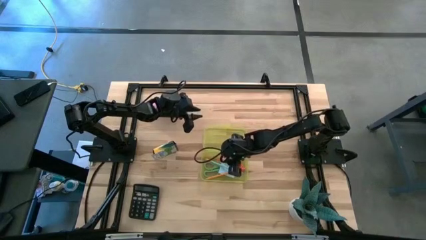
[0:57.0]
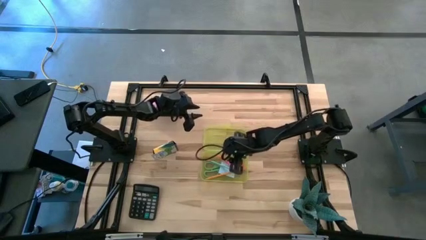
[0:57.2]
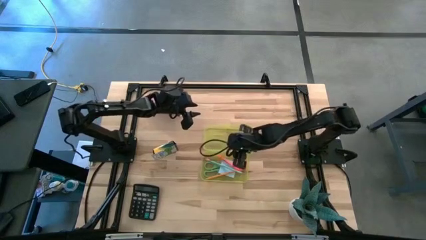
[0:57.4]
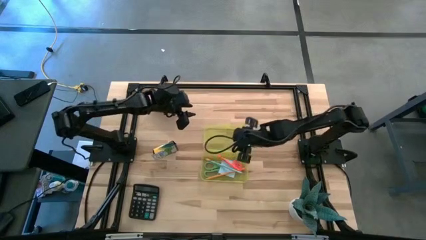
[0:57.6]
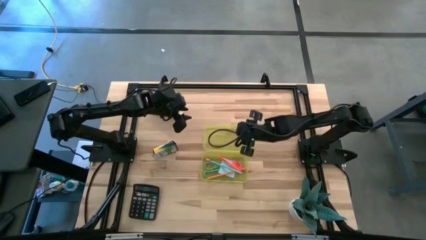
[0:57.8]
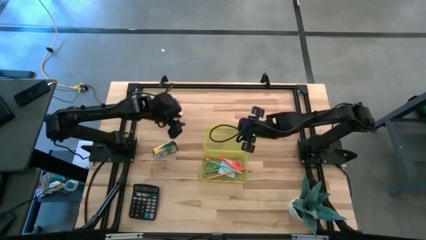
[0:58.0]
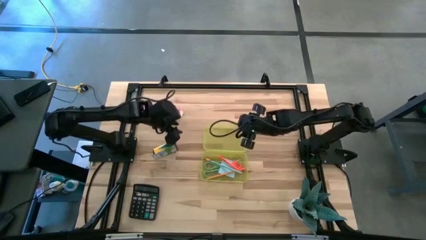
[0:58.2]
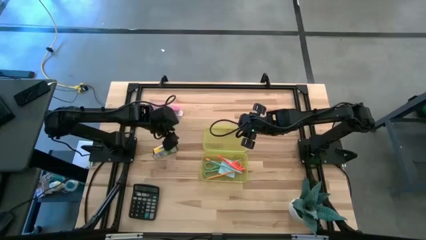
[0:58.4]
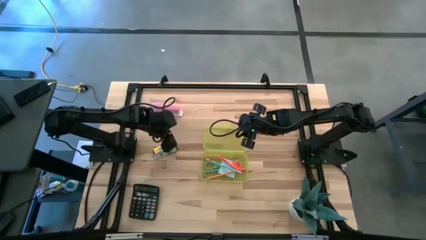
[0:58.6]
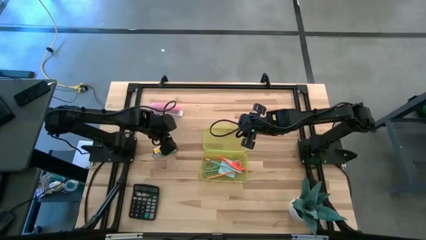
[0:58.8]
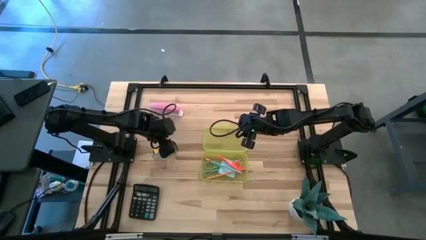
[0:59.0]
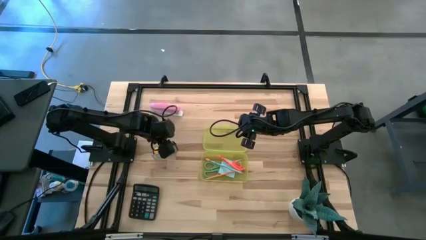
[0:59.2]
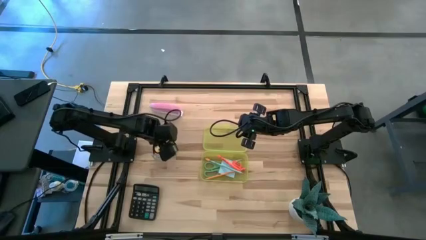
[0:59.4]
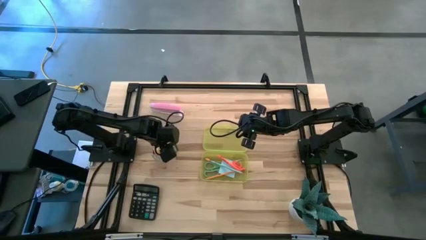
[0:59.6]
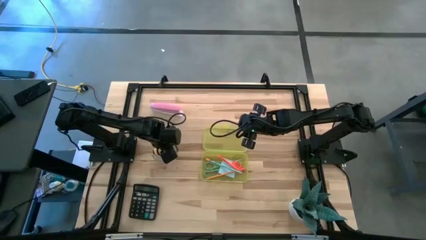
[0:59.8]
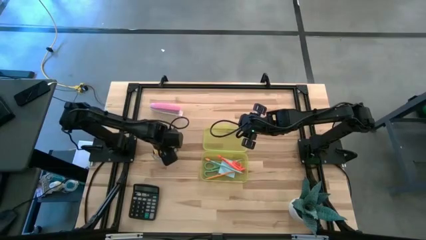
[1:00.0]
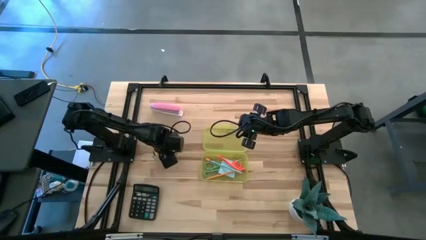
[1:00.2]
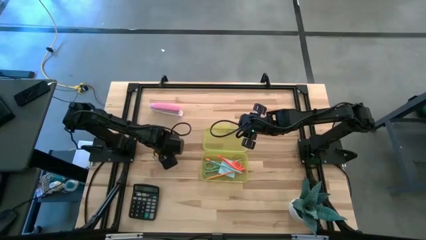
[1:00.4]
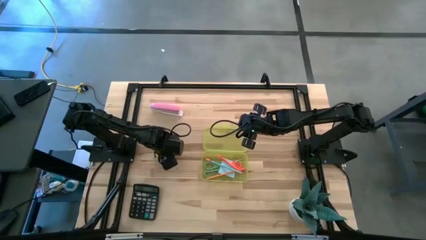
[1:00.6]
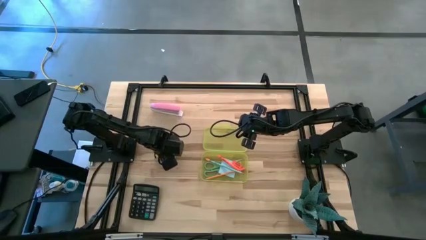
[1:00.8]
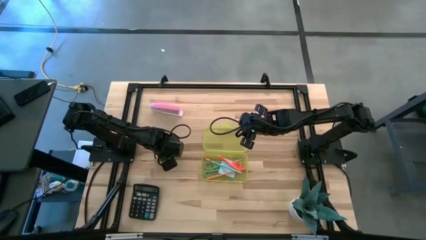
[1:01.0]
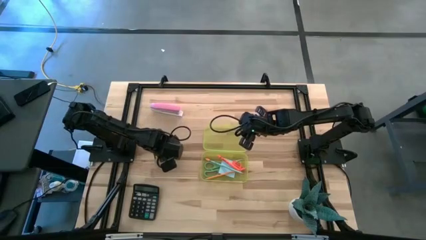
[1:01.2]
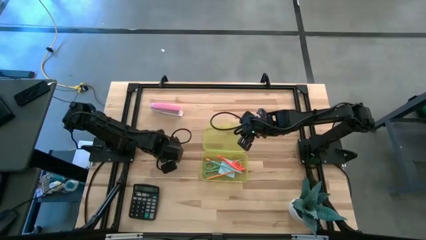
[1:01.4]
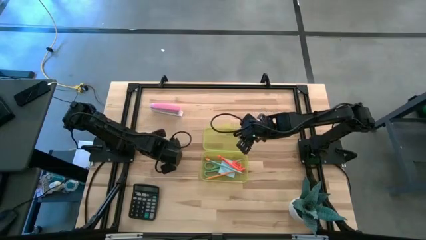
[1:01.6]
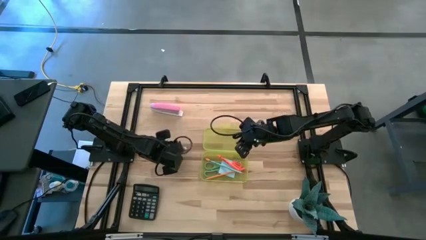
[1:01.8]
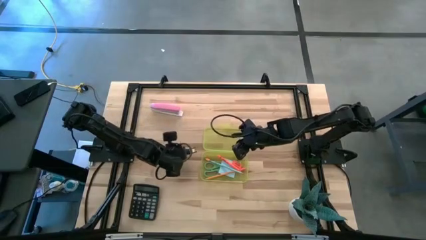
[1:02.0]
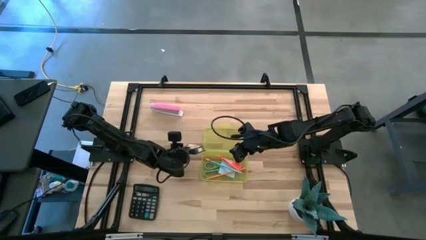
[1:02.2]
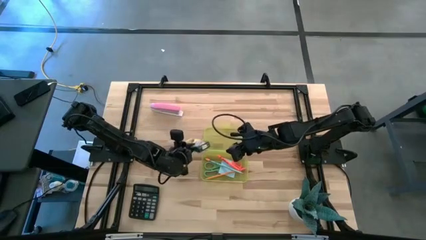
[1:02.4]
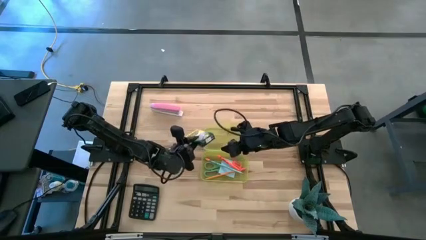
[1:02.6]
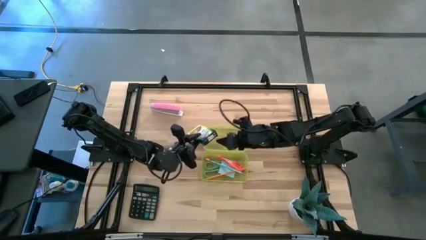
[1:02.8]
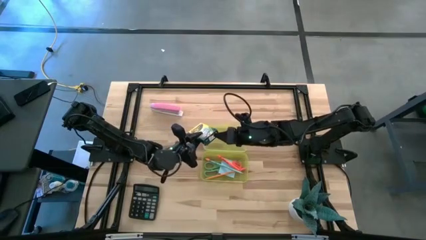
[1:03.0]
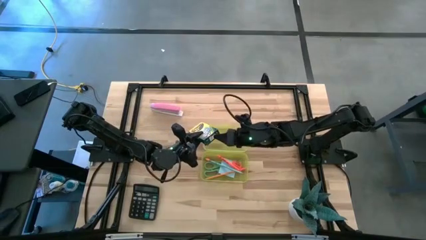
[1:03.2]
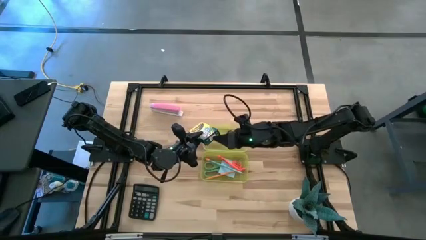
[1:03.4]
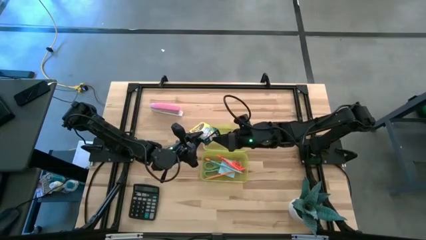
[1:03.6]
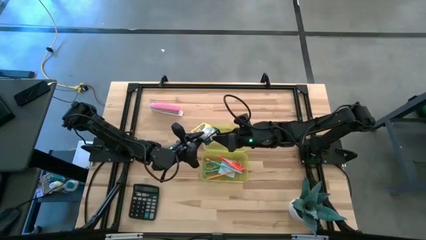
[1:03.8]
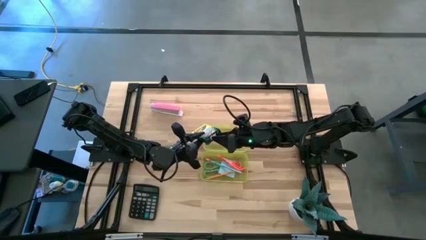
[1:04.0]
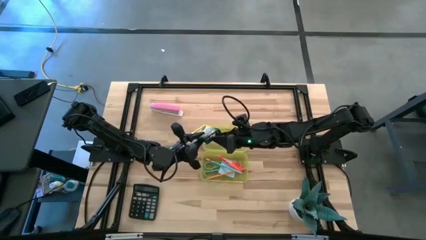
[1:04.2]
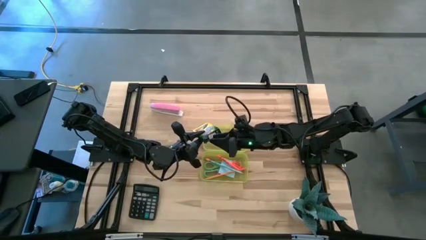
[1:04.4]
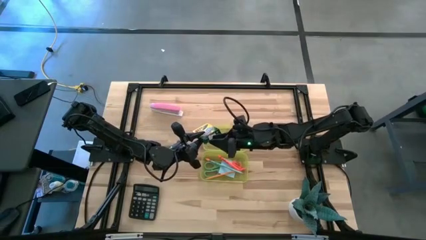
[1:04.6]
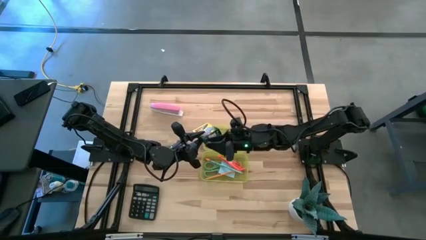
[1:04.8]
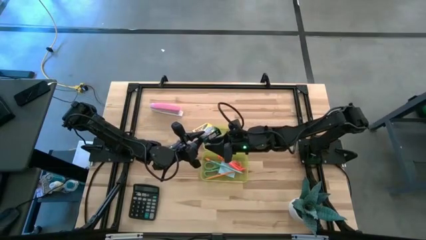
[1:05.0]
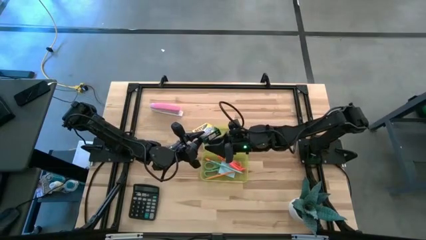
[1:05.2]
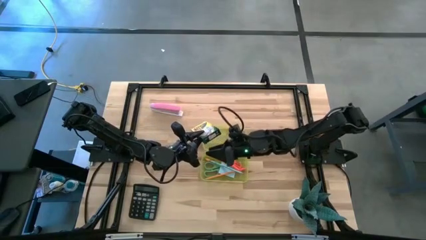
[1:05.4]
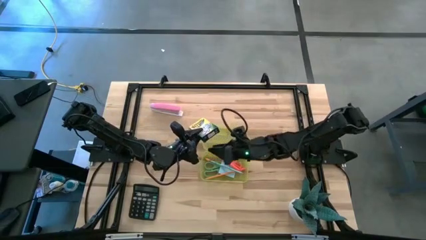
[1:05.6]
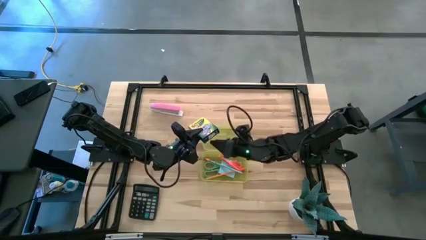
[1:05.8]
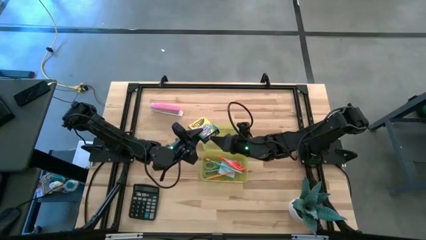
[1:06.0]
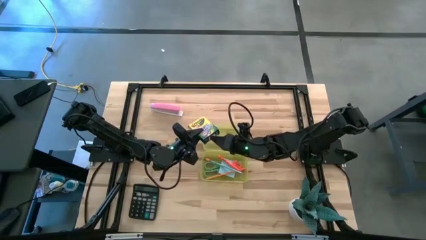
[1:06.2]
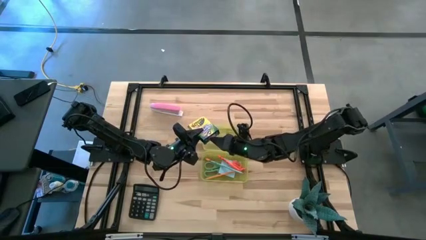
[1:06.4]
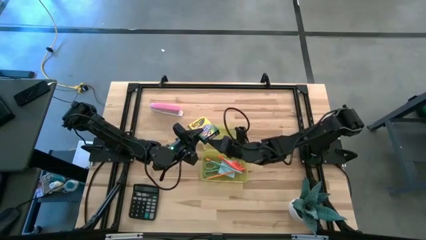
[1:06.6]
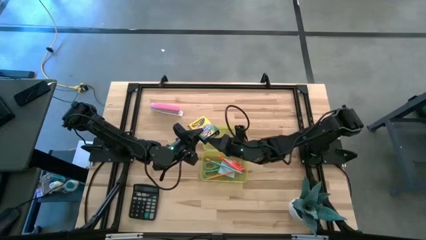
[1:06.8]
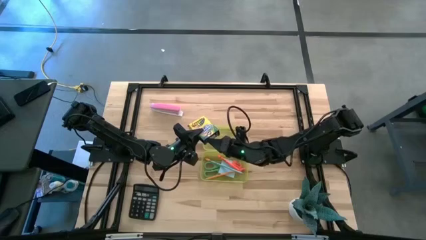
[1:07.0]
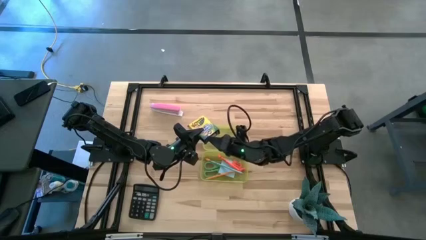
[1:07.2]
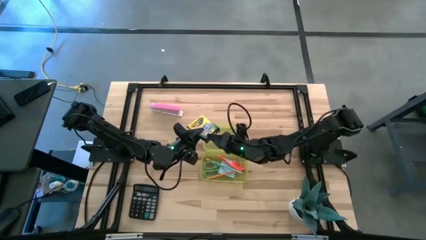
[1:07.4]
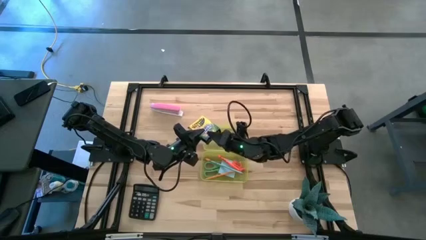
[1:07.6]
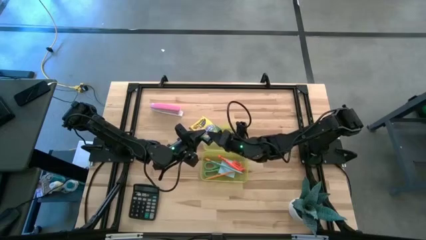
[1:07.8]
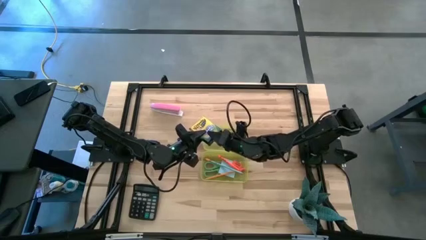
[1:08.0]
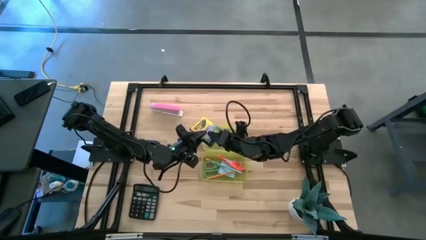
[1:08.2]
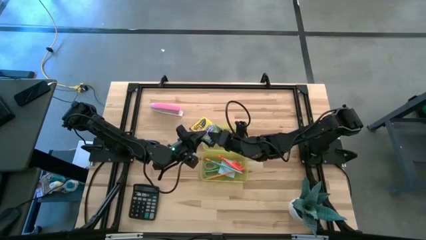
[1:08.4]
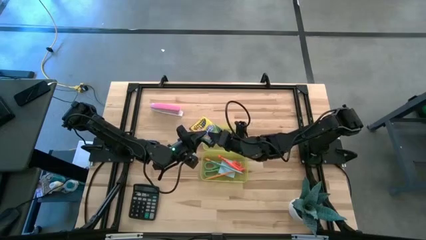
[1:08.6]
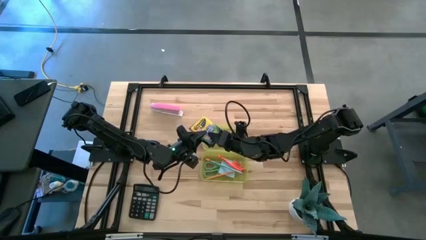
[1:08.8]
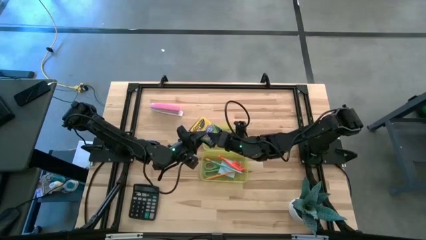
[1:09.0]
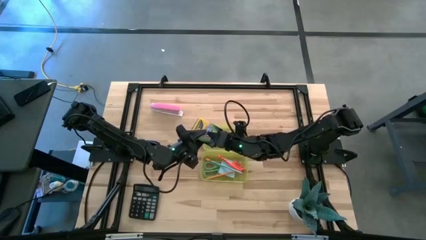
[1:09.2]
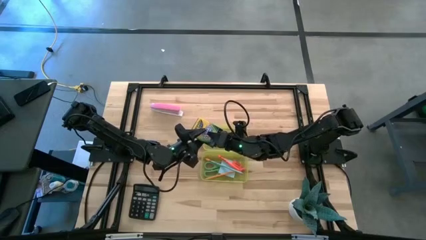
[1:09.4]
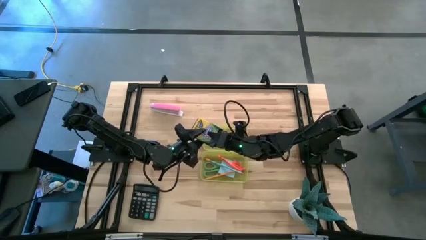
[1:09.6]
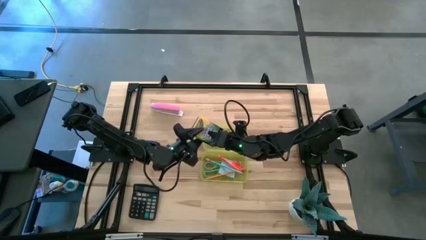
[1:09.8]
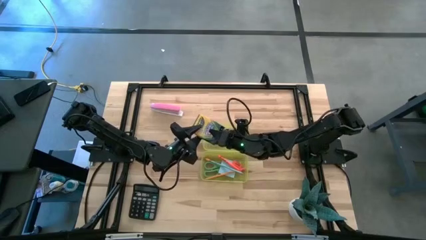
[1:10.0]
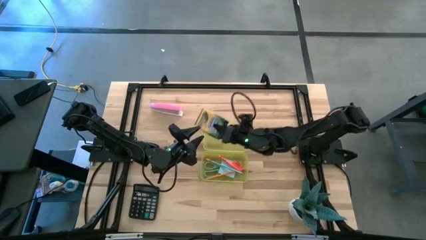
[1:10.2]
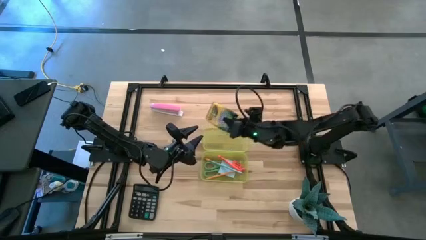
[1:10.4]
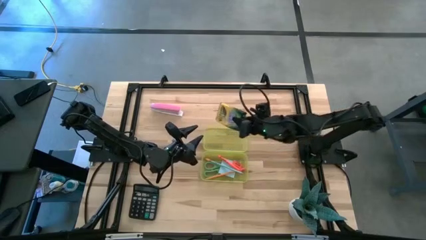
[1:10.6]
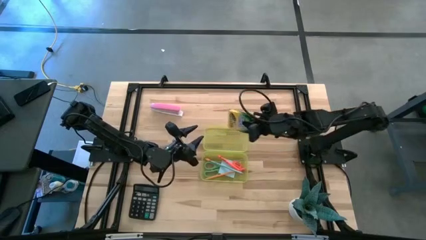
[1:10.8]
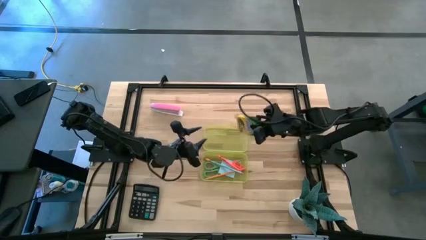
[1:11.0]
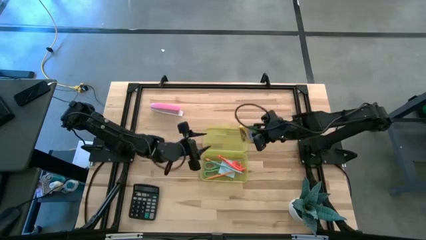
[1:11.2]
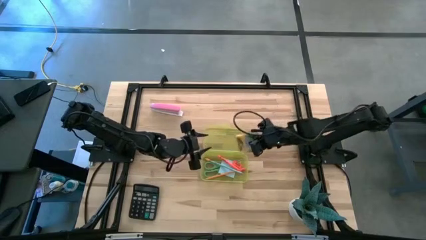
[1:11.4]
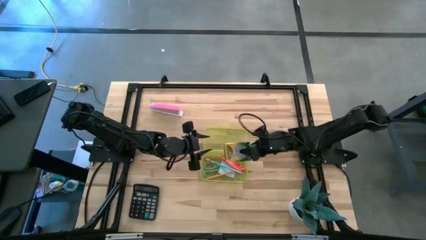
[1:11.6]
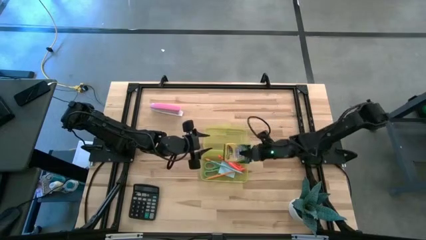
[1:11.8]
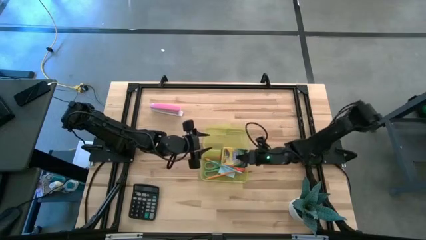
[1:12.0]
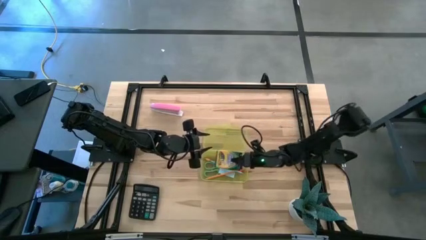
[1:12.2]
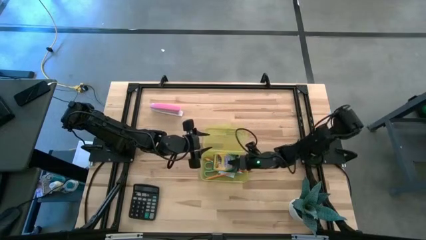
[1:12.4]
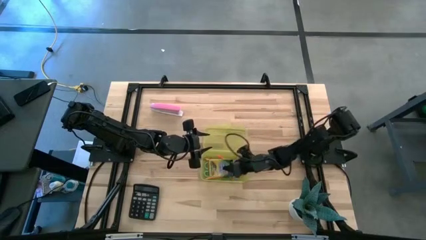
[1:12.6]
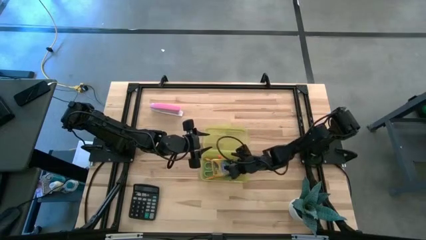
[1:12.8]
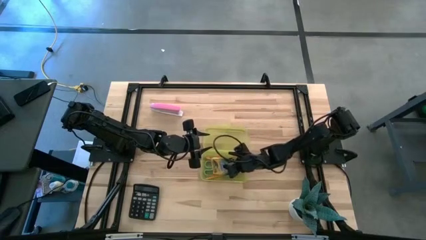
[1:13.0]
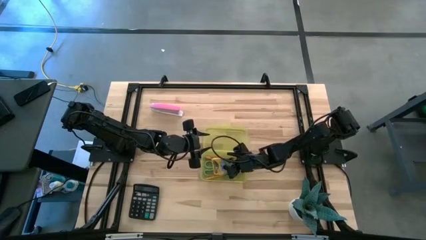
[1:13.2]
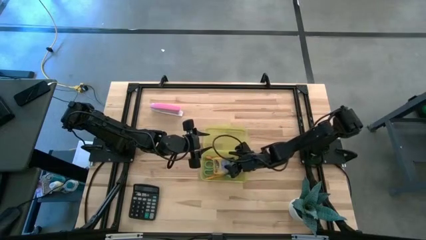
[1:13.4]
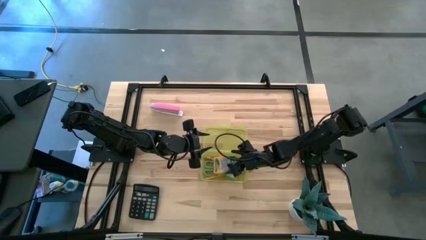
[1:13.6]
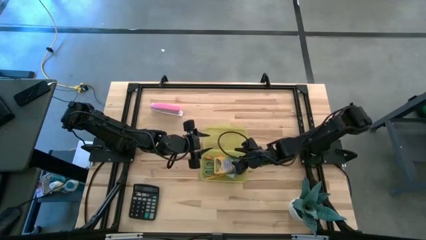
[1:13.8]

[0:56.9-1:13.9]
Task: Pack school essentials
Put the crayon box into the supply box
